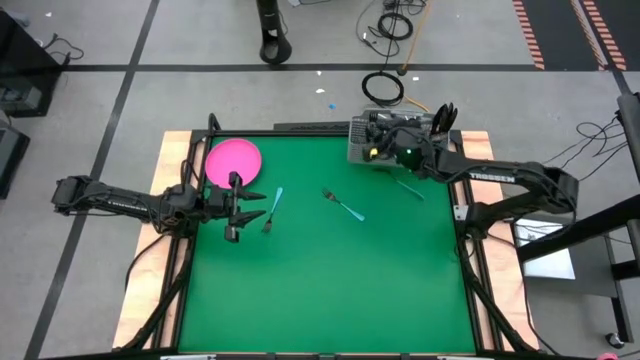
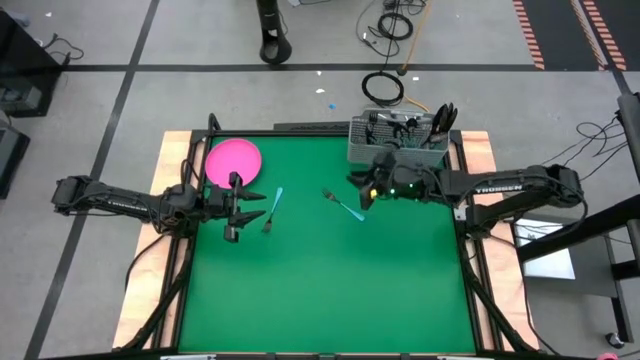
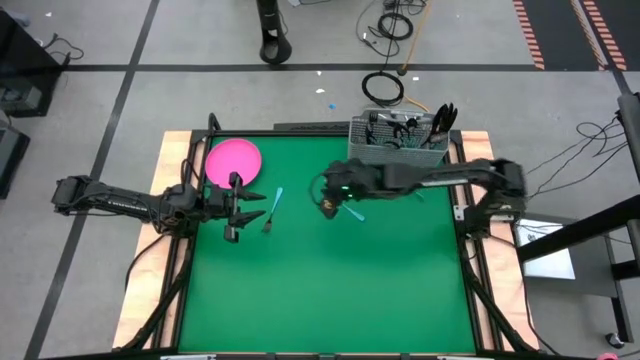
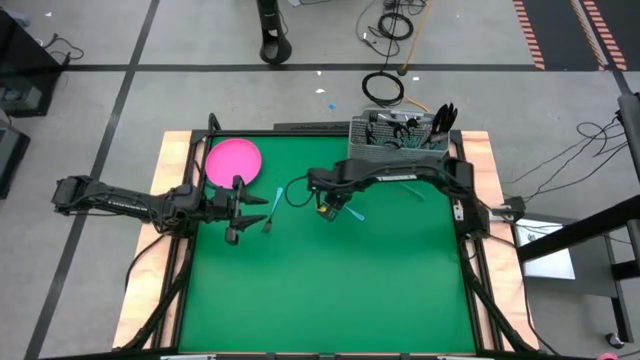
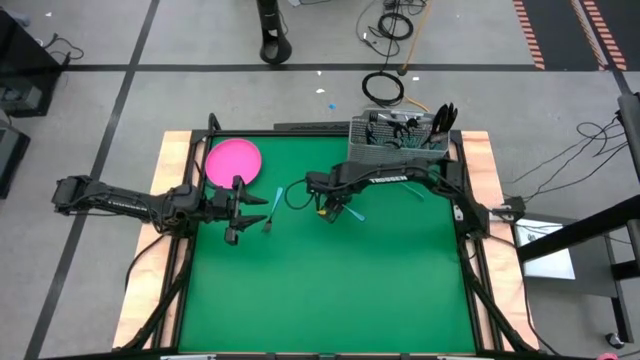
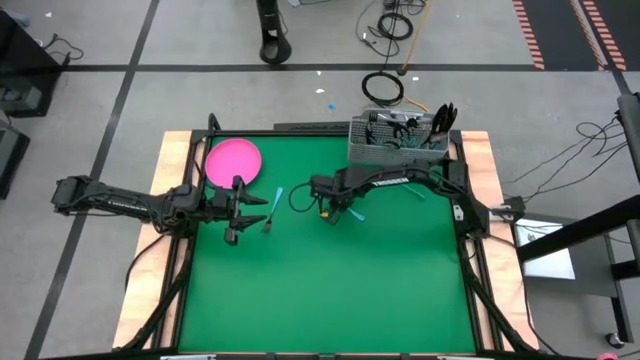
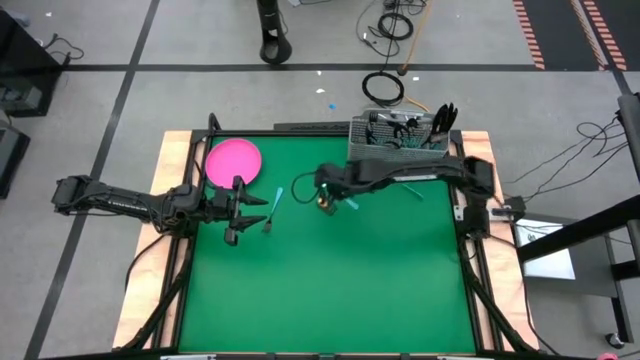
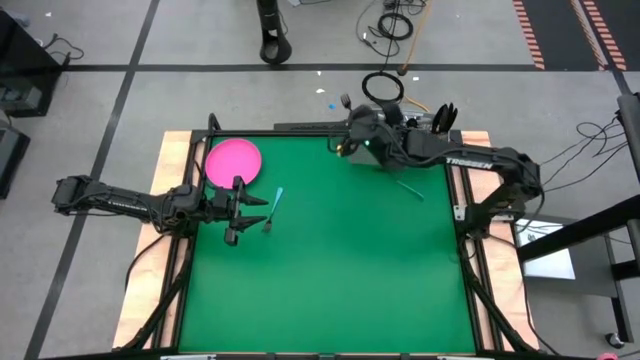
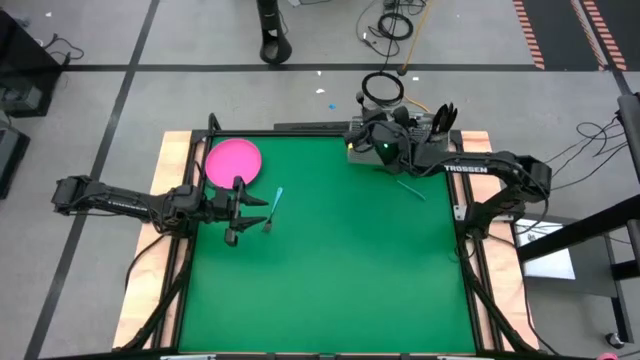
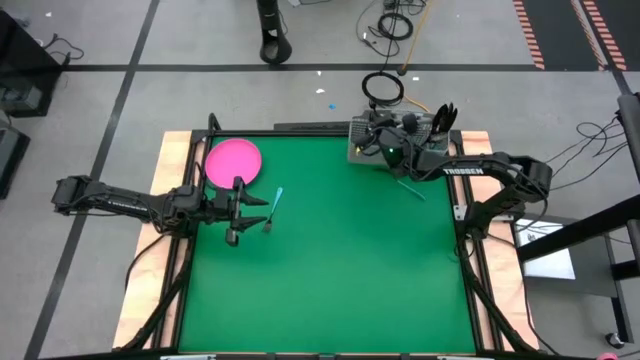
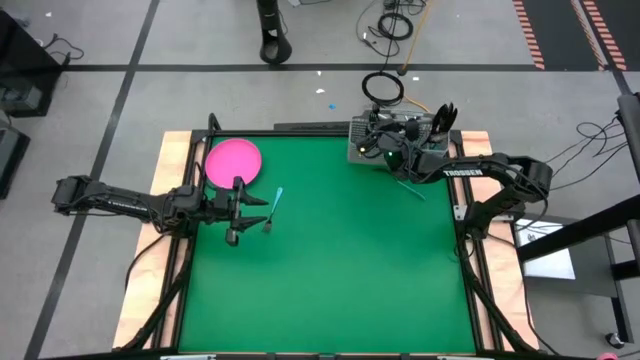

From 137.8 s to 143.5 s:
Task: Sort silverware
Put the blue fork into the gray silverware basket

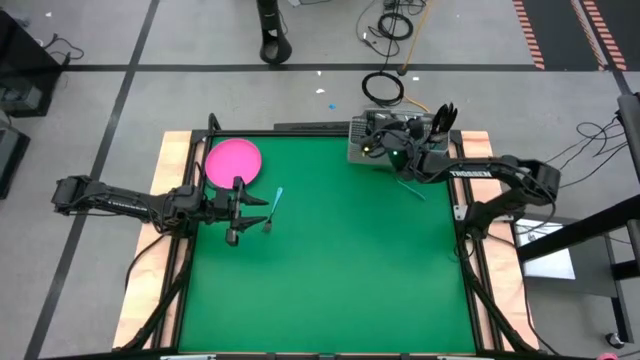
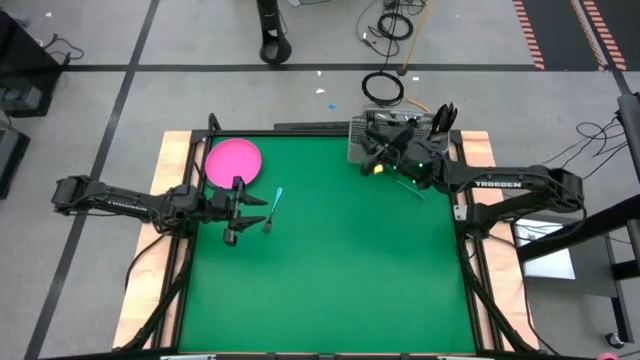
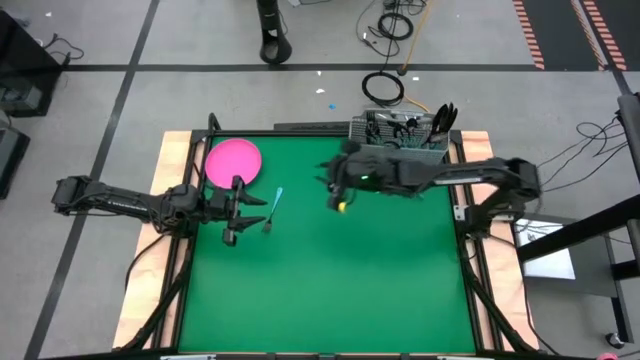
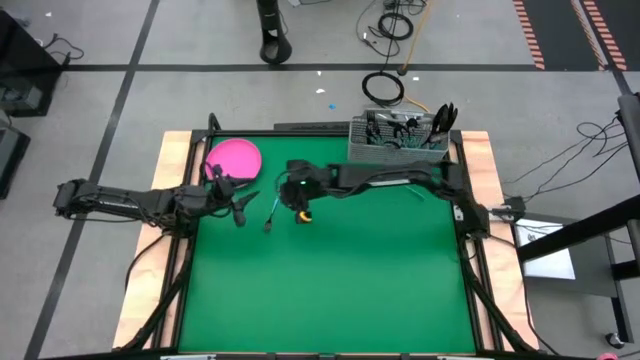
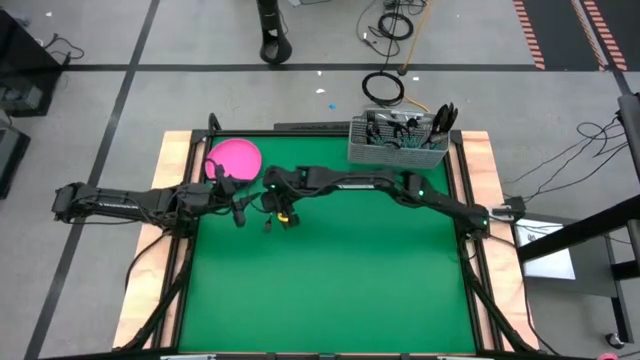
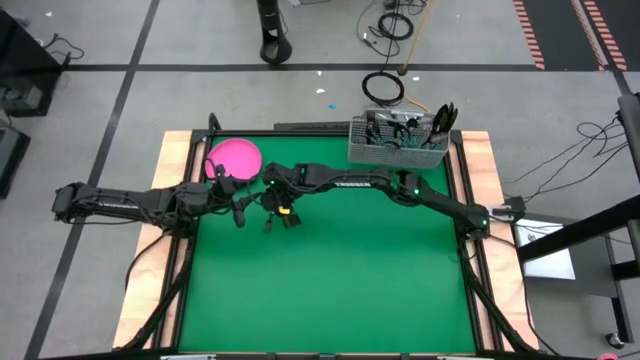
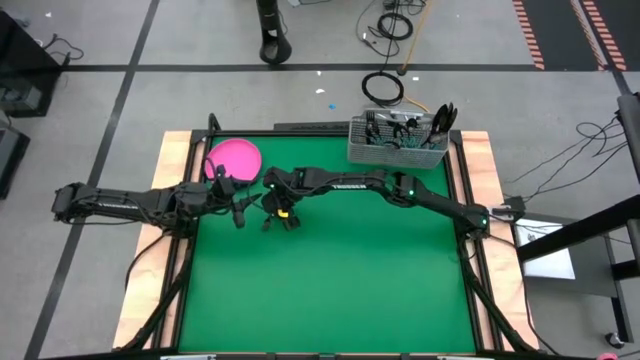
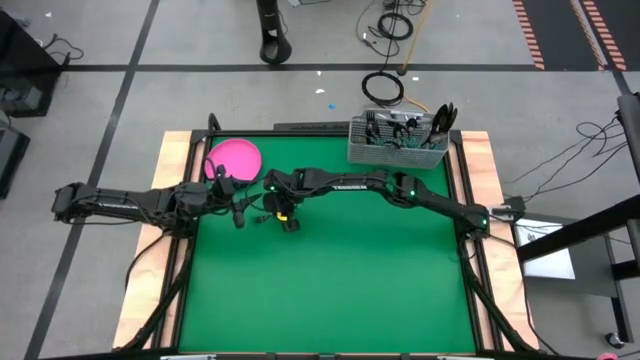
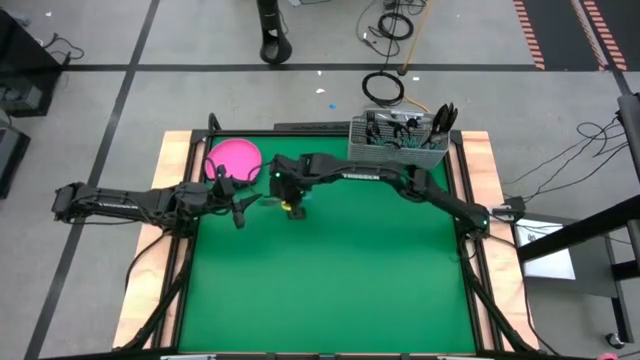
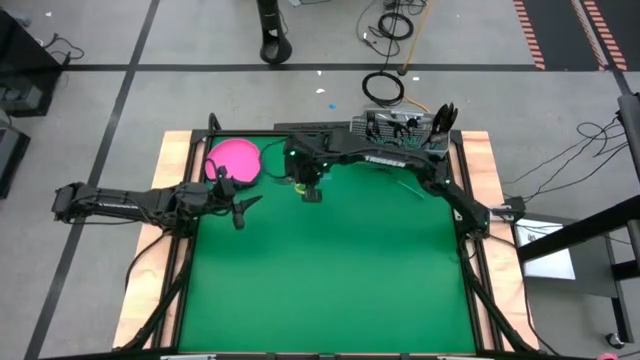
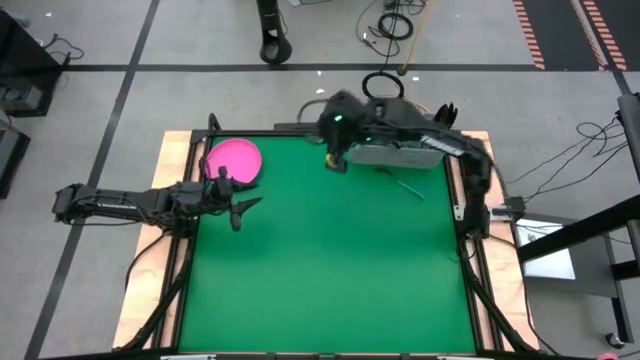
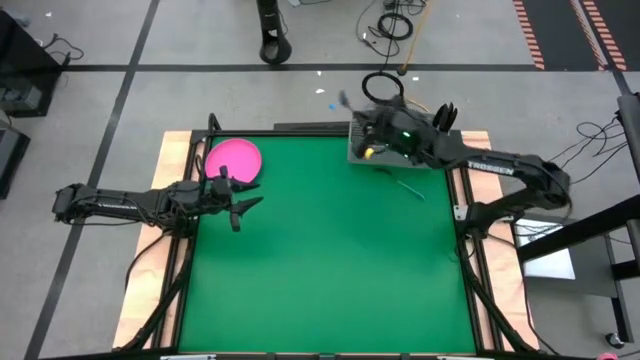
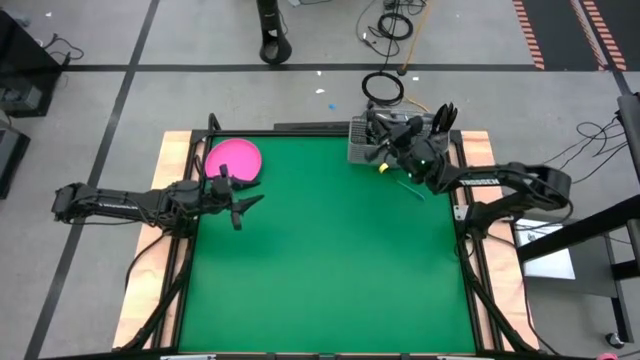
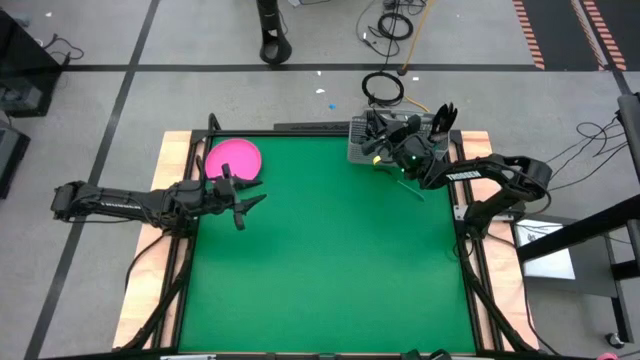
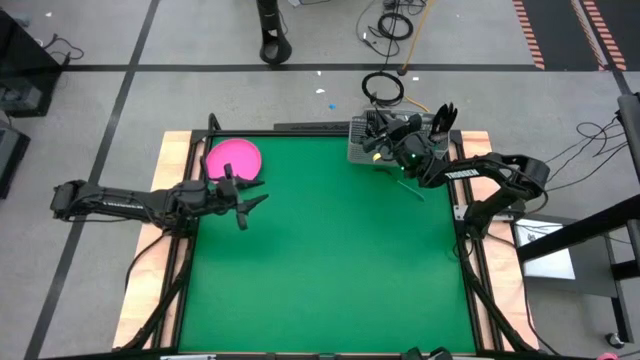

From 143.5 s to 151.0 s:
Put the blue fork into the gray silverware basket

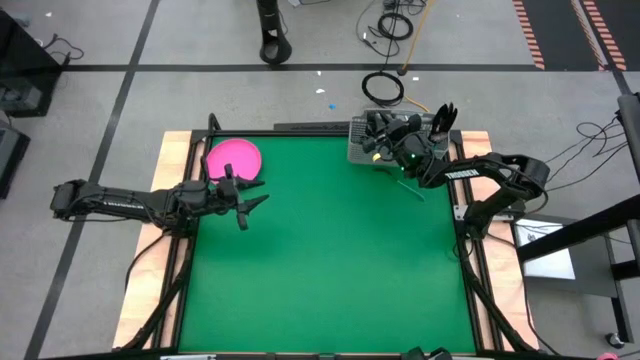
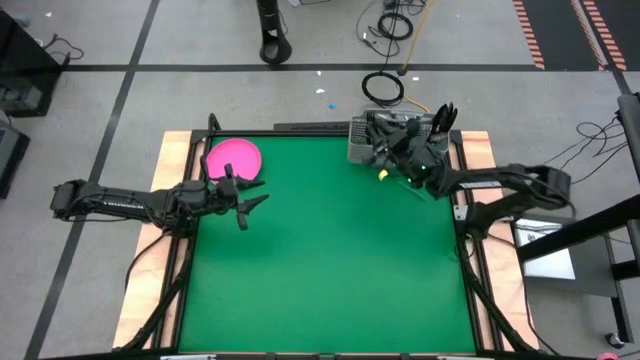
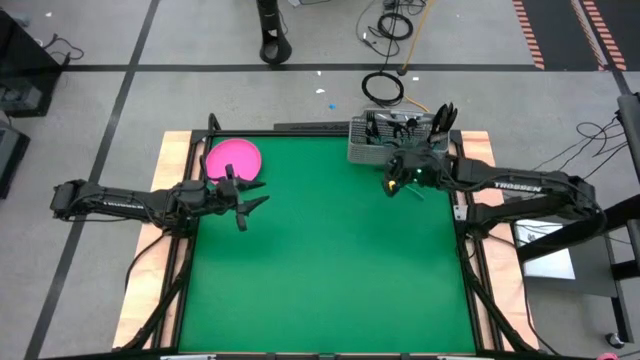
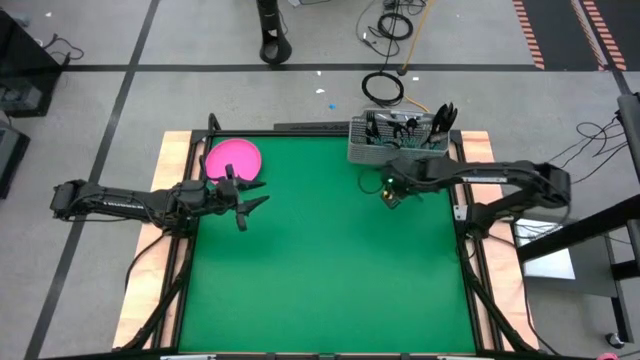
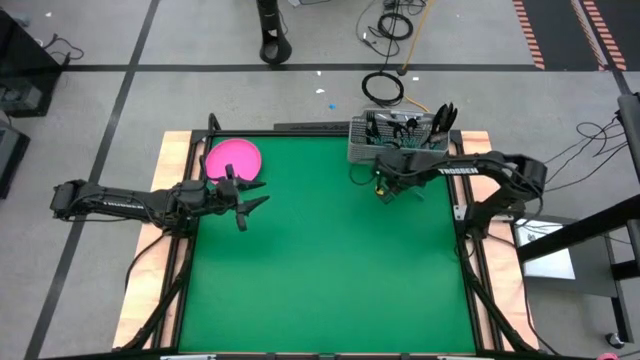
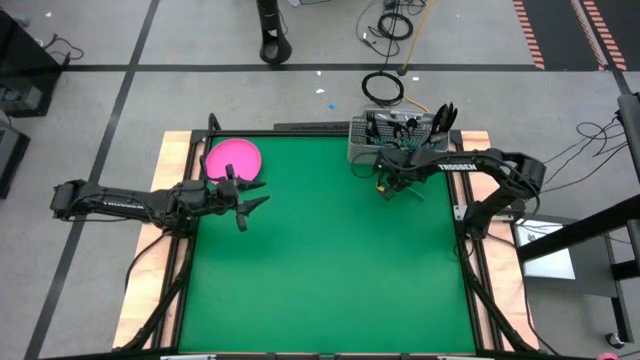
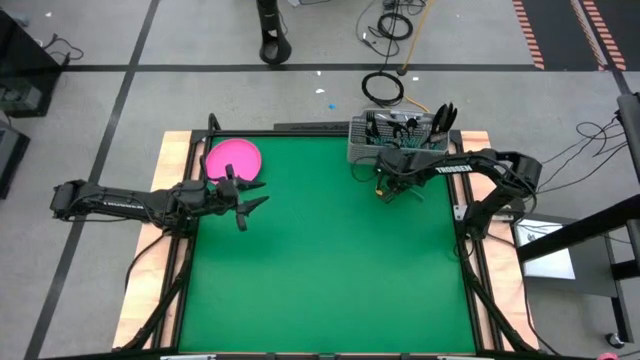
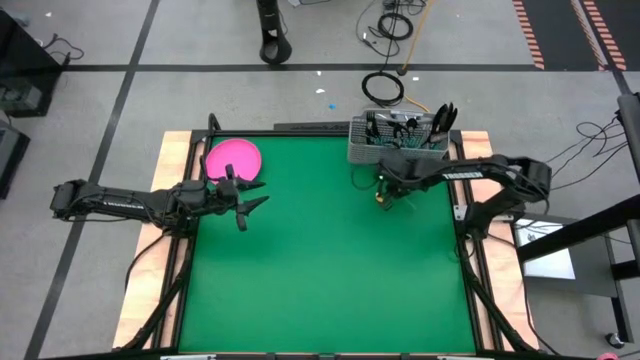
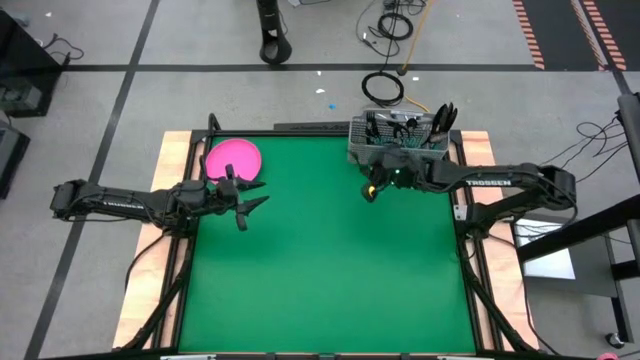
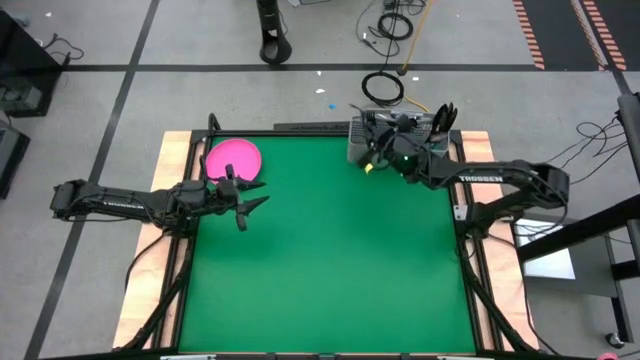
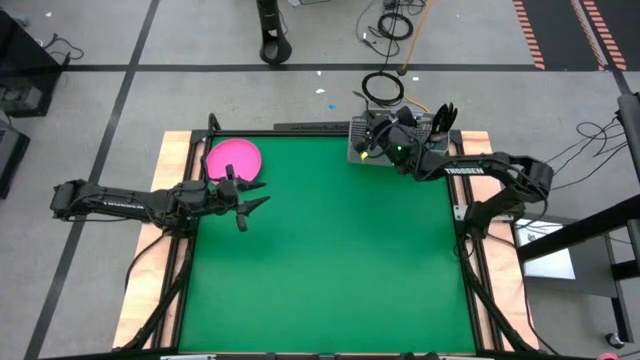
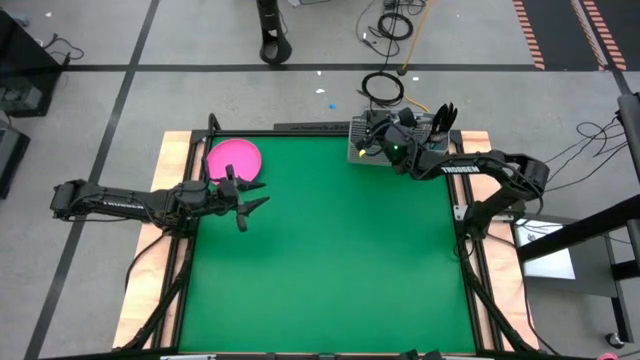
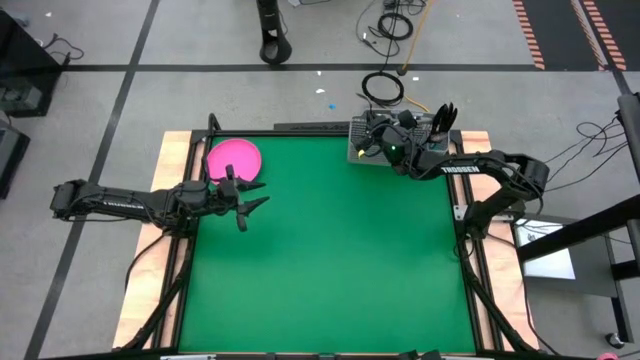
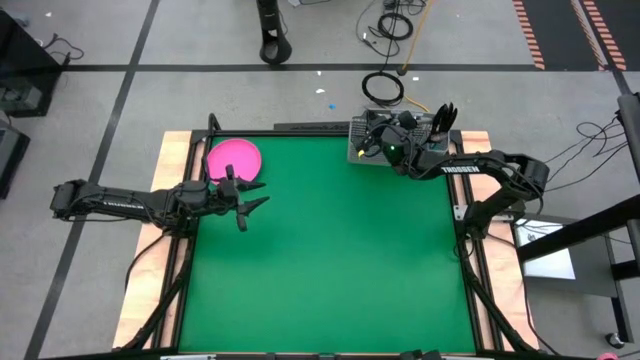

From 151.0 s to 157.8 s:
Put the blue fork into the gray silverware basket

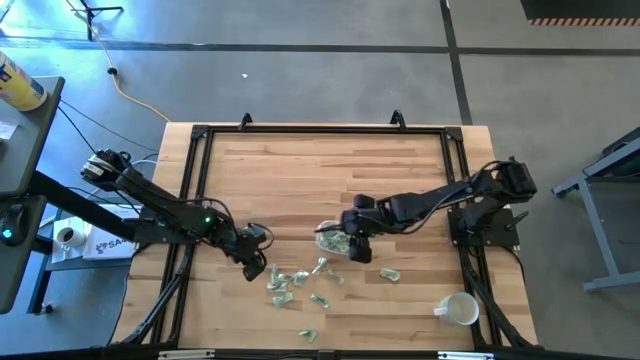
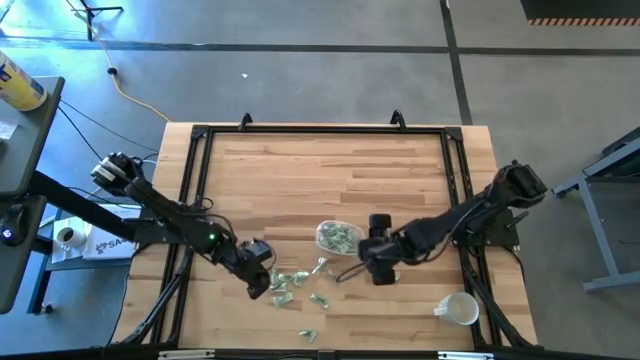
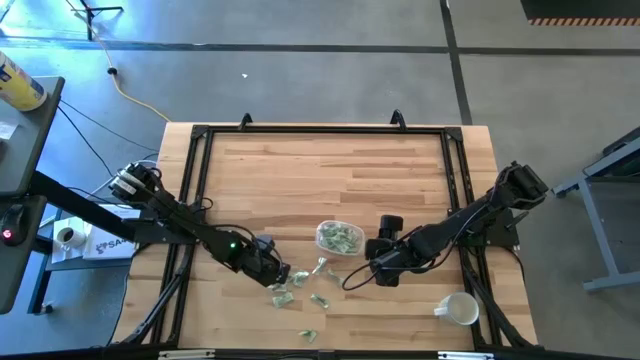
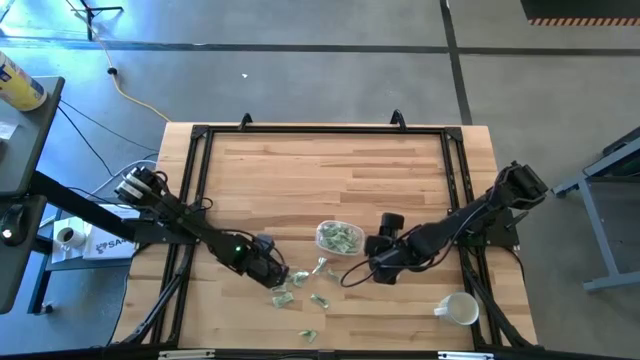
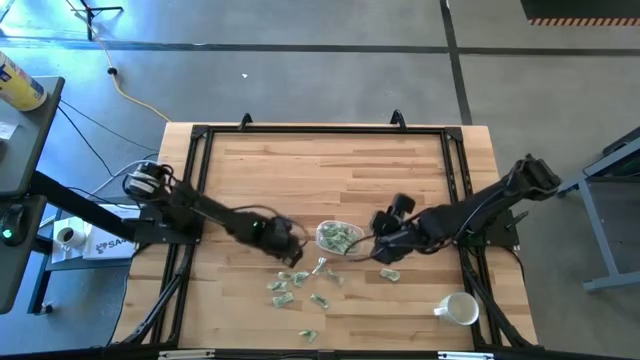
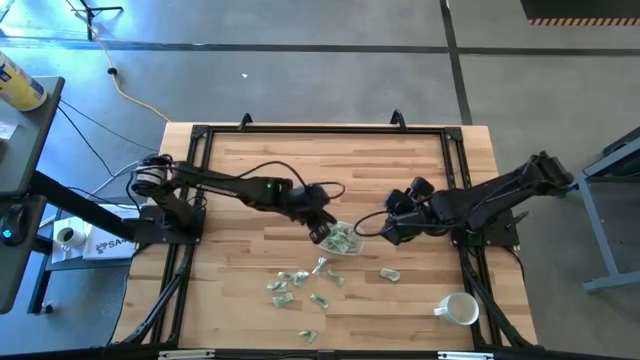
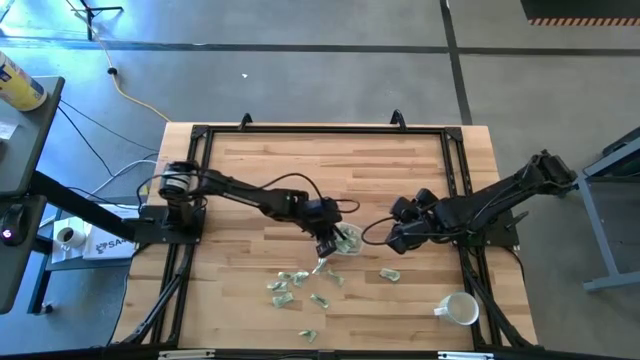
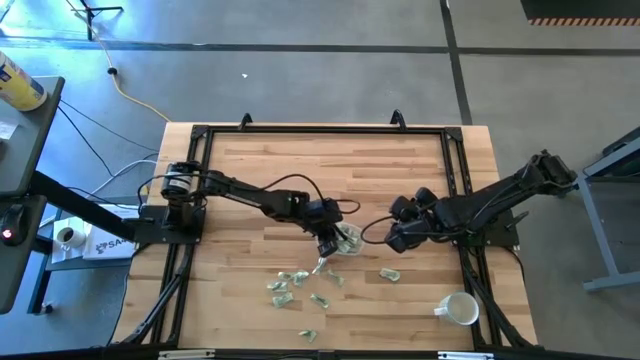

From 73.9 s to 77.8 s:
Task: Pick and place Stevia / Truvia into bins
Put the green stevia packet into the transparent container
